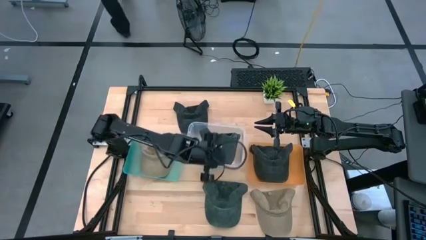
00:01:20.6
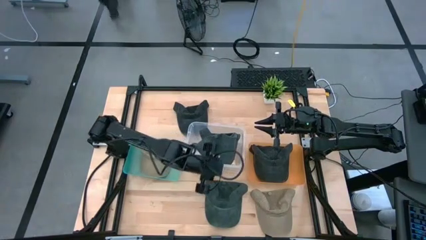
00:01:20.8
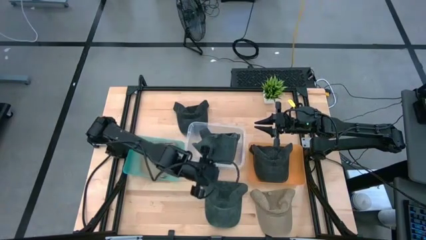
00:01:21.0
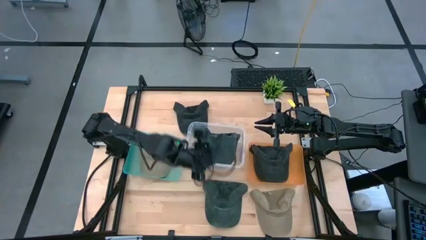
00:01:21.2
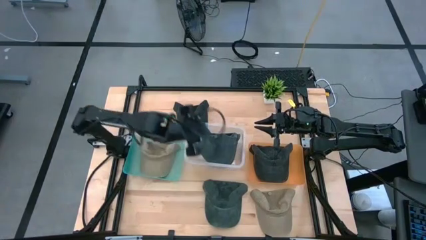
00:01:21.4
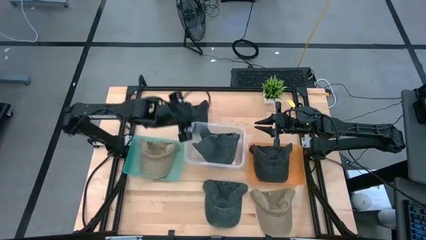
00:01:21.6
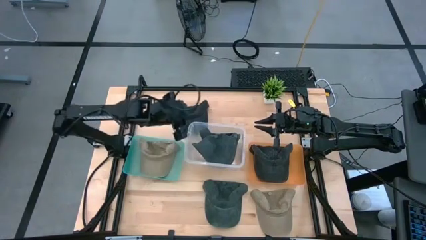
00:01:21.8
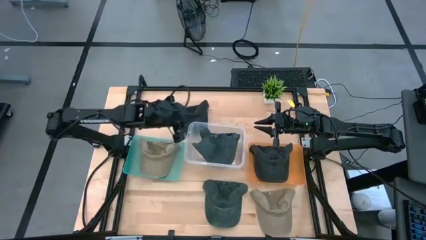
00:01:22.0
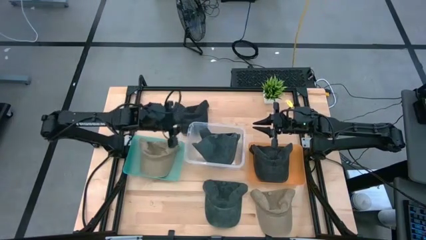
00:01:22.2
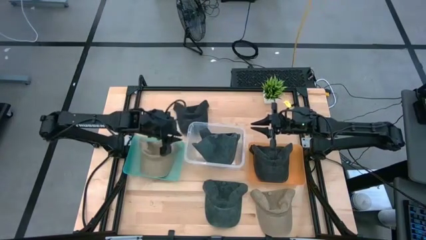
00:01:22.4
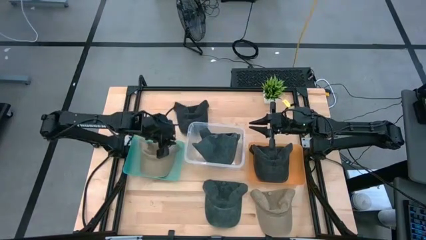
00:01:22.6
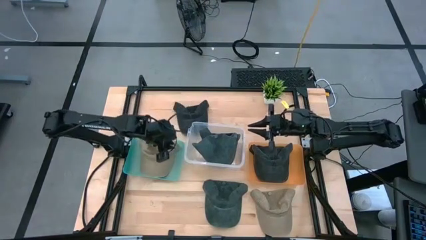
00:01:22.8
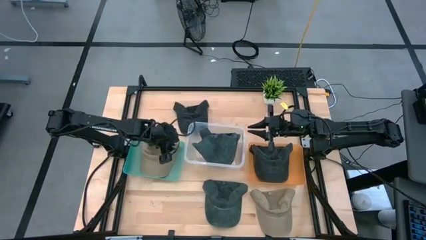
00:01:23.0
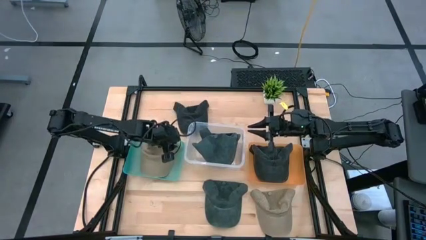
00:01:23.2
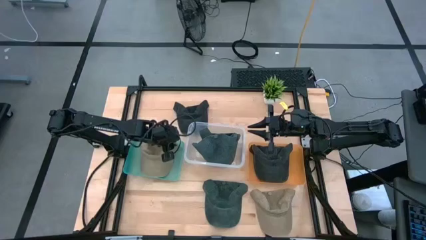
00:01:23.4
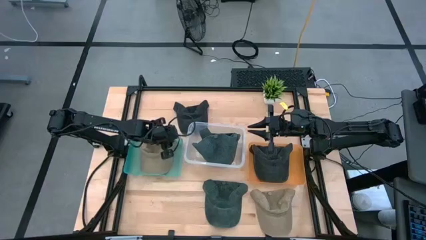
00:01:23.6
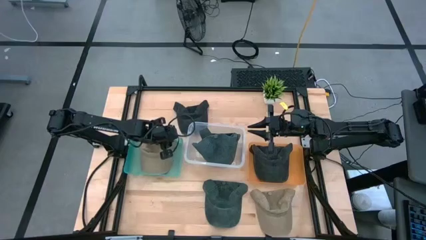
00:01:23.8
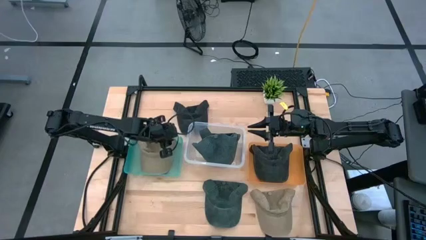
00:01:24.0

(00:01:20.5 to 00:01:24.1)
Task: Pick & Place hat
Adjust the green bin

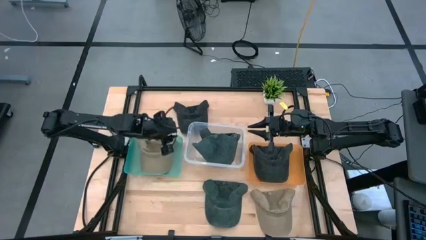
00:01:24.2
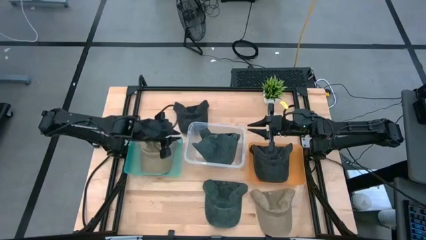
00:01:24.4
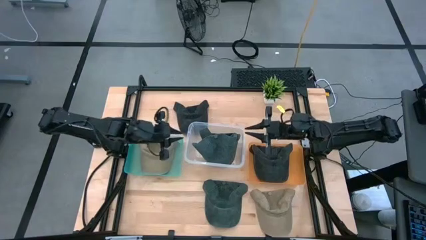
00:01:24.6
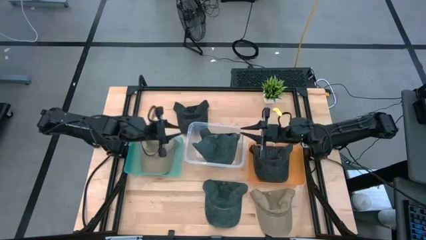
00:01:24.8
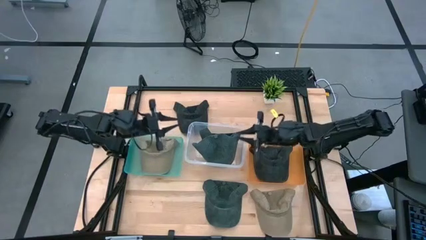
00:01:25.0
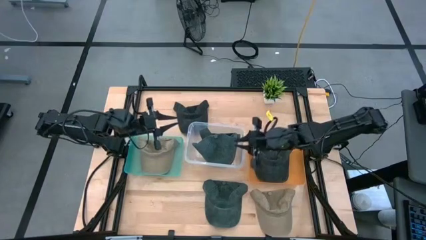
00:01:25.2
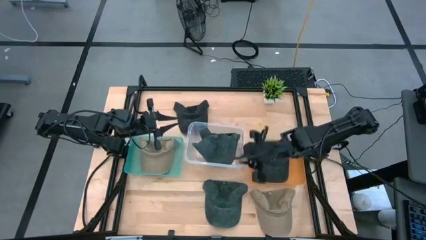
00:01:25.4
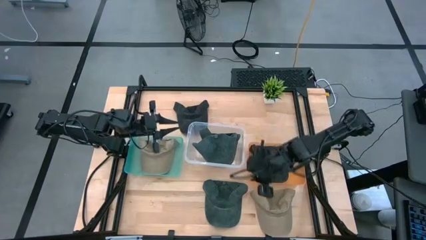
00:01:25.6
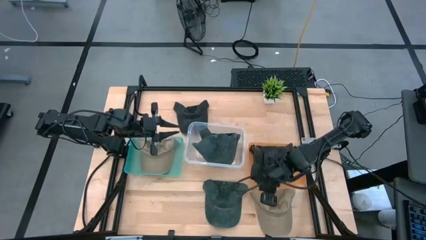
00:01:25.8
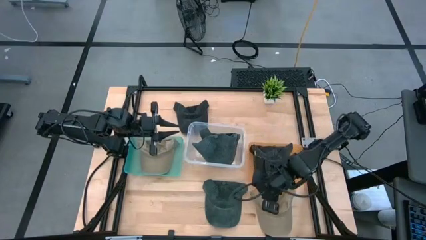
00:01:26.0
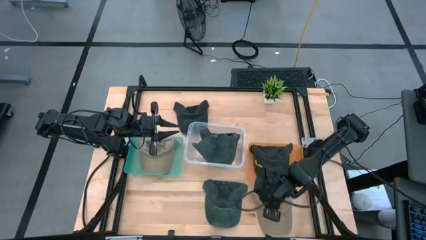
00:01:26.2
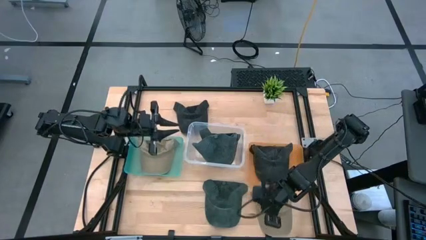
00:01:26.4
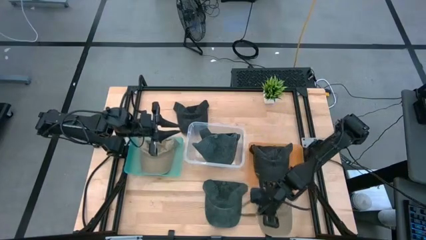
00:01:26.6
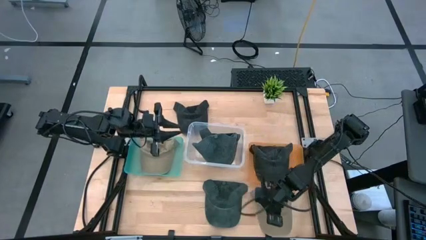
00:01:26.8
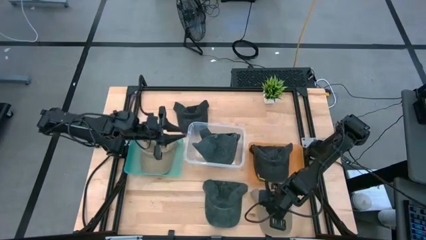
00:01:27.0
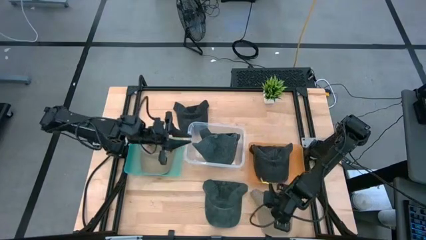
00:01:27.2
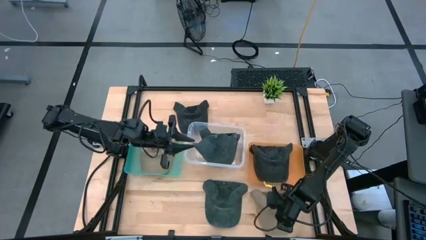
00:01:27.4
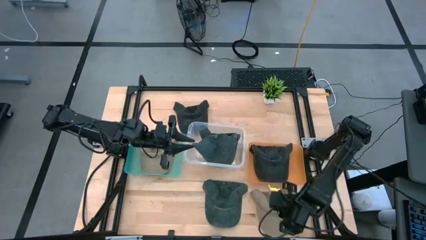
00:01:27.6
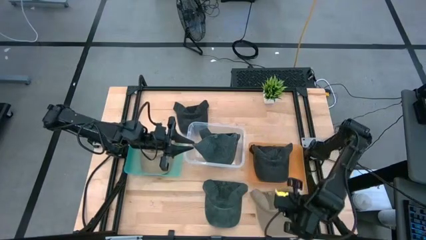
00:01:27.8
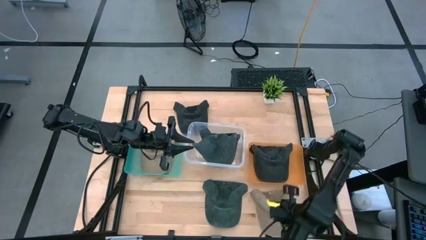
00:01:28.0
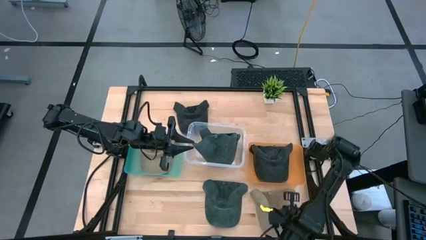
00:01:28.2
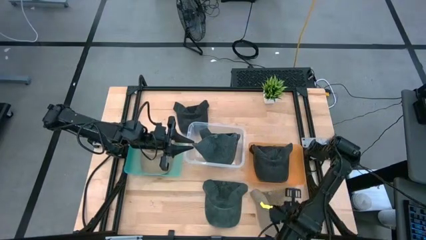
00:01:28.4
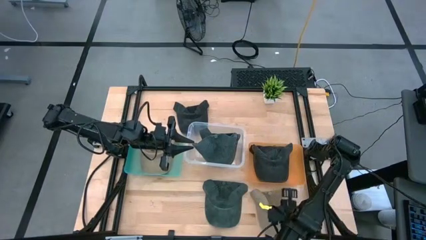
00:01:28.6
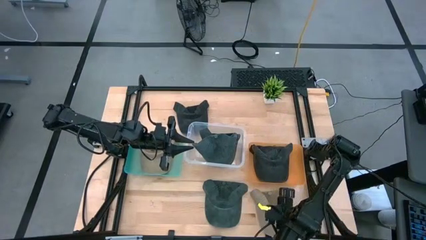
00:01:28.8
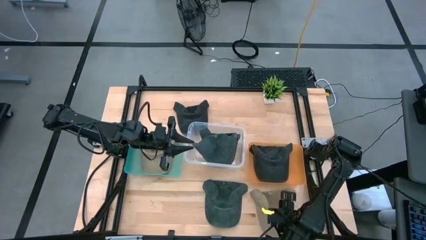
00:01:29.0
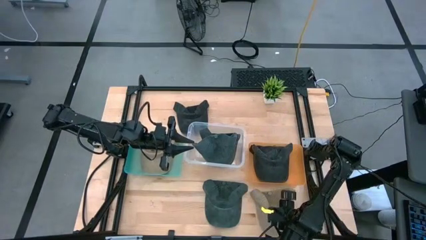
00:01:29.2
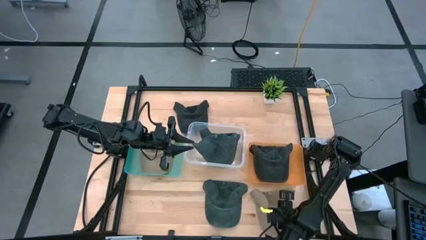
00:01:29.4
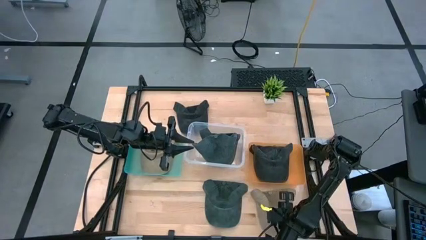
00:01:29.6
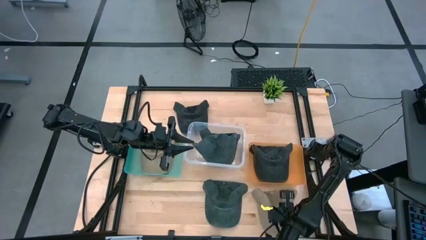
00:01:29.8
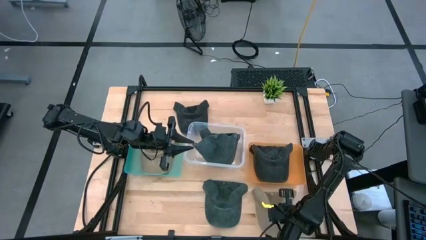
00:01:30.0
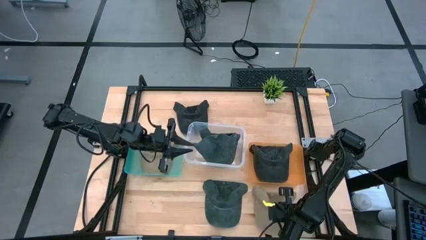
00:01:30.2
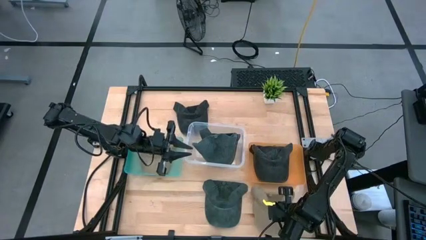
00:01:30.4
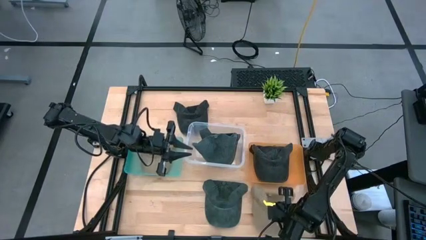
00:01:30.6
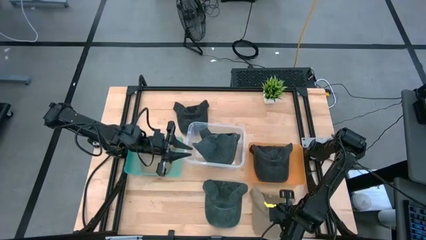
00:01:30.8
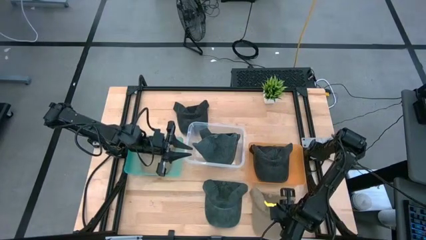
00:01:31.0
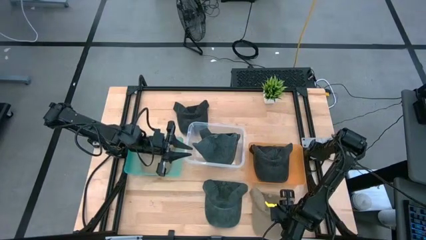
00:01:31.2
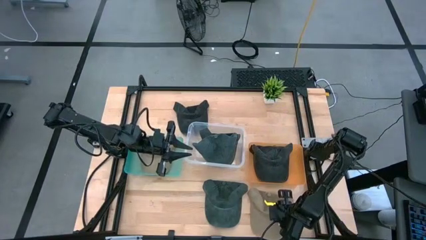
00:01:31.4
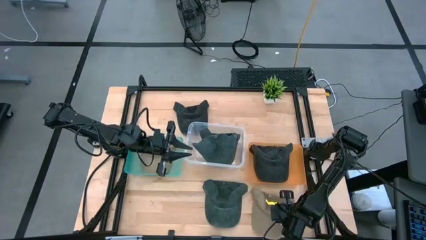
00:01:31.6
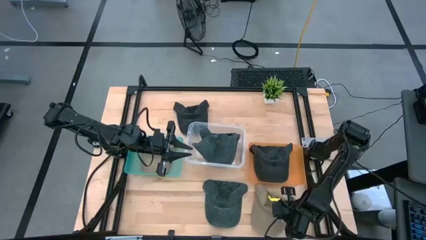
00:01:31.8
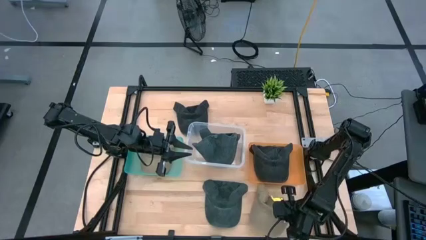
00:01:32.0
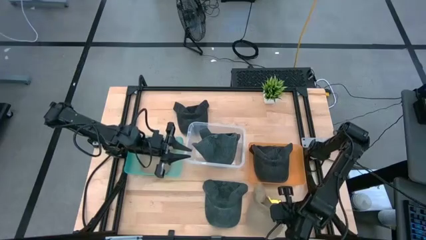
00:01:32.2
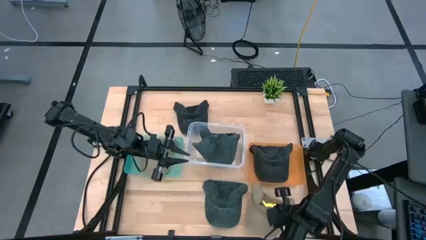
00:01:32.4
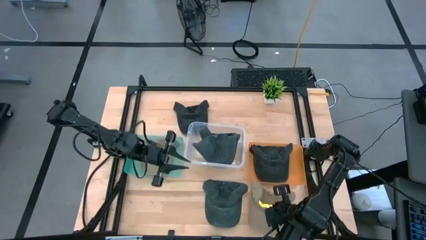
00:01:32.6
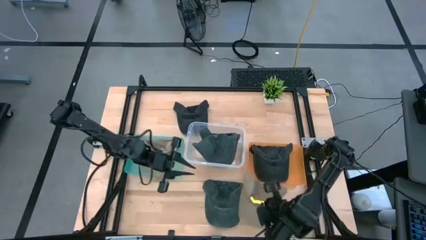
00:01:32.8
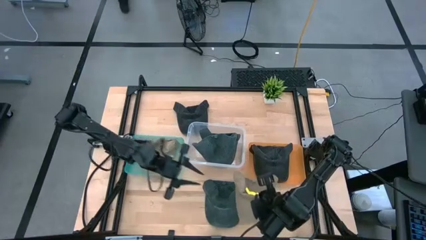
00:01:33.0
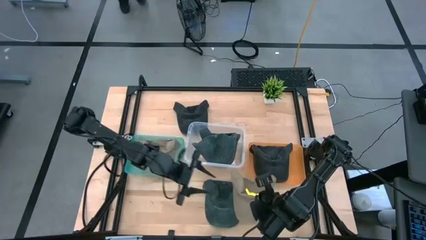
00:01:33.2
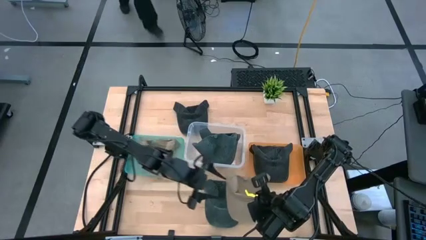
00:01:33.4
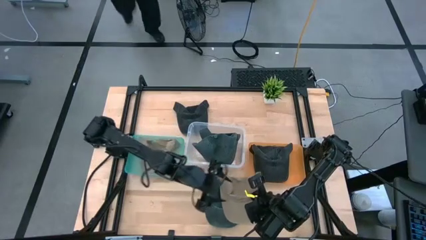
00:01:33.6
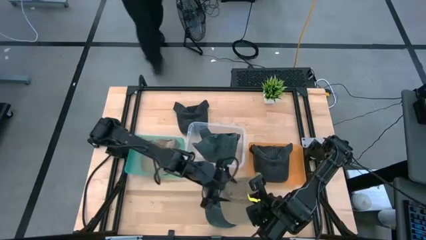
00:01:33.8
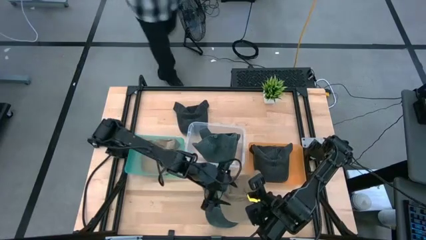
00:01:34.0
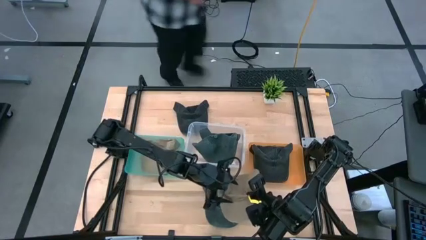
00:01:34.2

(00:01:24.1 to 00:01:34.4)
Put the brown cap into the green bin

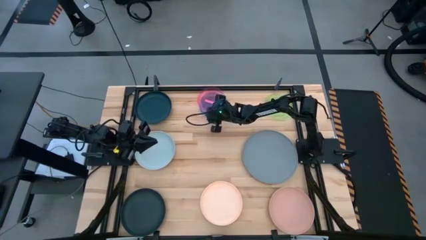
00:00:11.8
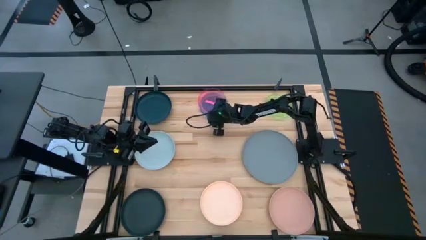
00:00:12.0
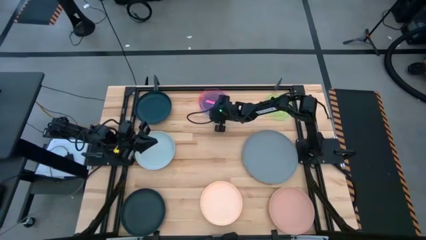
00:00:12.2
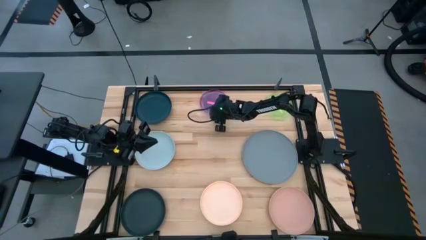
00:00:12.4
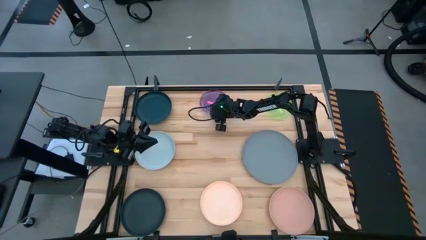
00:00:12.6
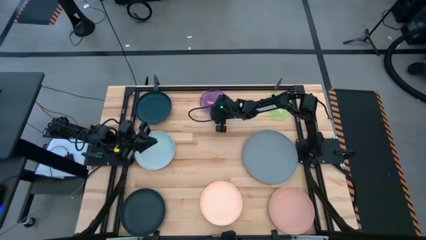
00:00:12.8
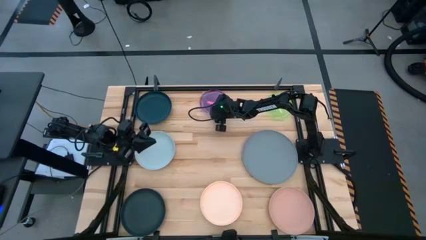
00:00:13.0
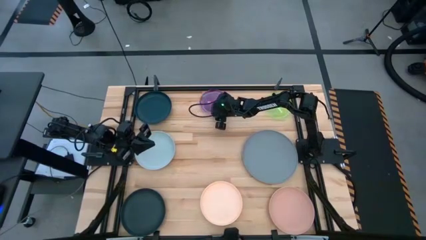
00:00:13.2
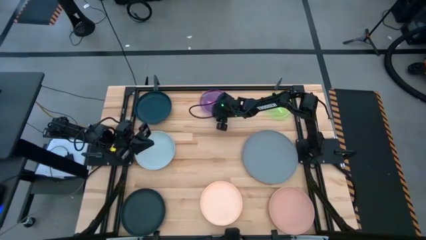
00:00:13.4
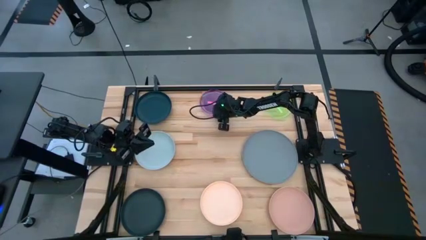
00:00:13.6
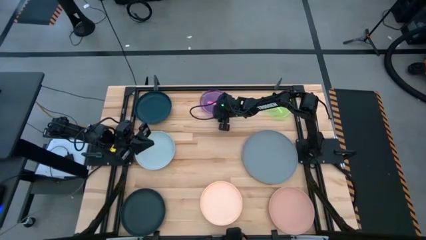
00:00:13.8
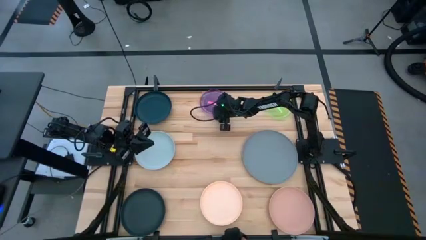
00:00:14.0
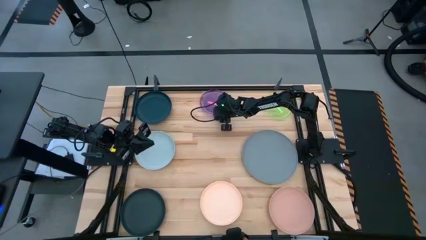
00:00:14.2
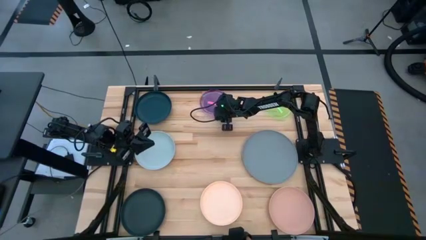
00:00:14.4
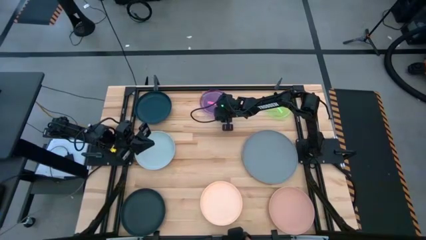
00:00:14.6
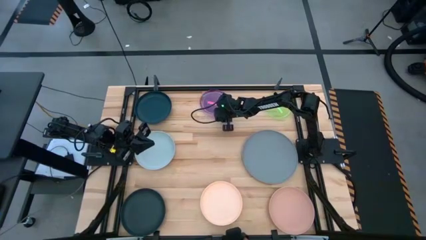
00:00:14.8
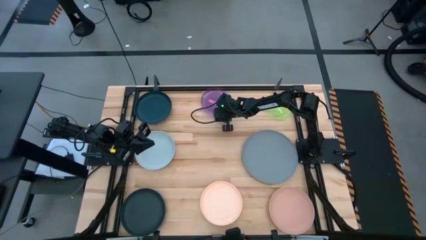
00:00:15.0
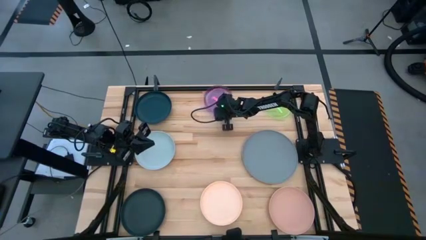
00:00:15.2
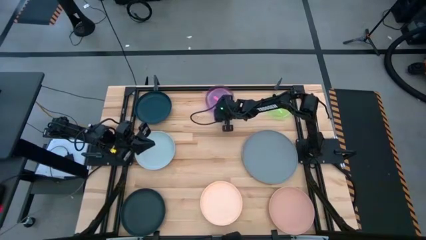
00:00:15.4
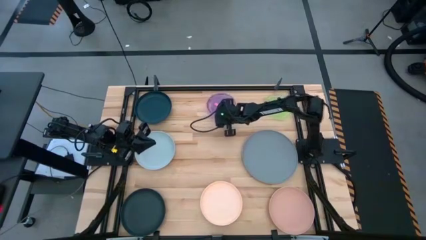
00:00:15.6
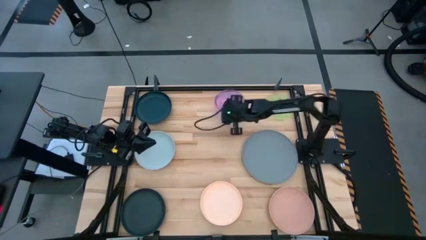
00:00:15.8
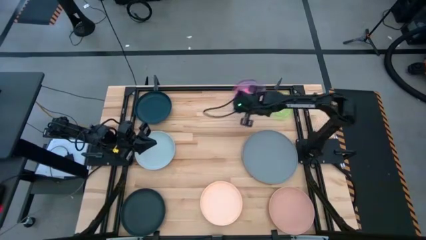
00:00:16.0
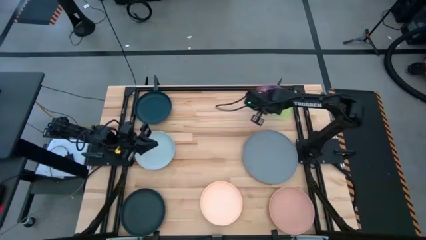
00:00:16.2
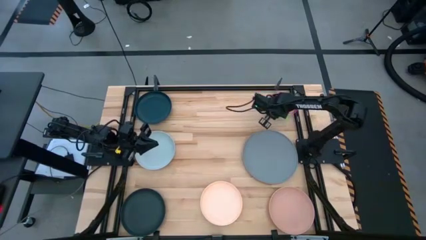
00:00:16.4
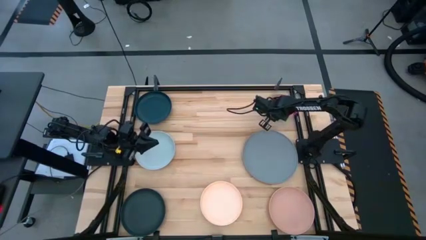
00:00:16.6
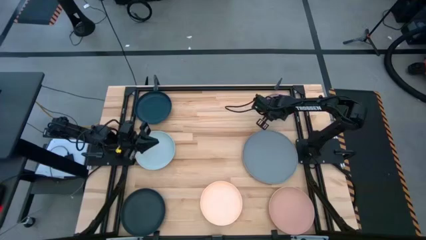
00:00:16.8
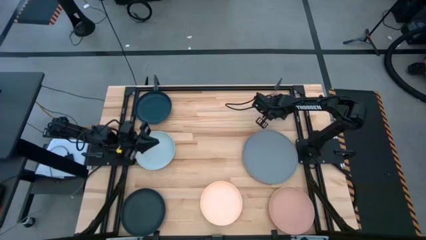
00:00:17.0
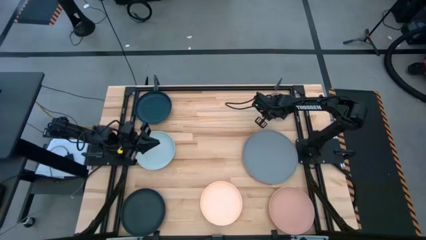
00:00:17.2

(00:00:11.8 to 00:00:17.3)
Task: Stack plastic plates
Stack the blue and pink plates on top of the green plate
